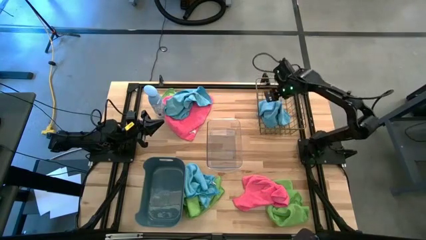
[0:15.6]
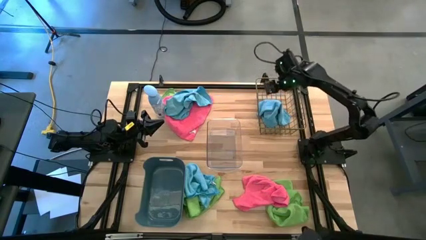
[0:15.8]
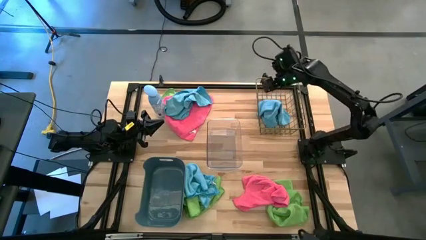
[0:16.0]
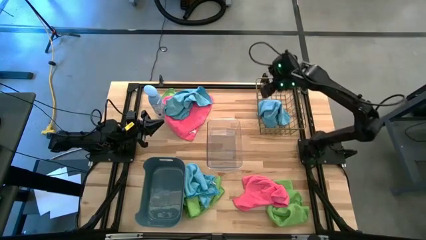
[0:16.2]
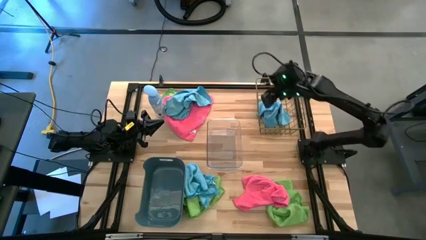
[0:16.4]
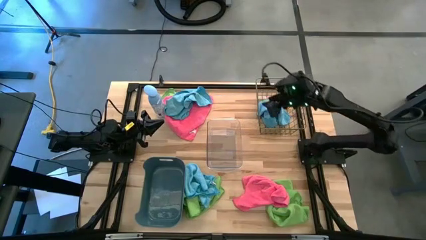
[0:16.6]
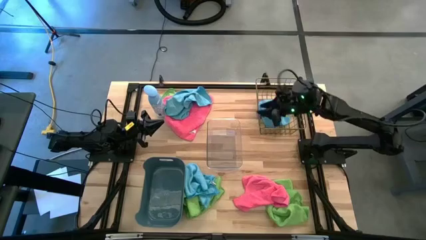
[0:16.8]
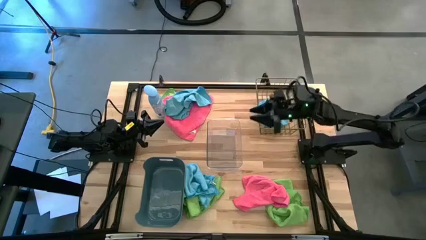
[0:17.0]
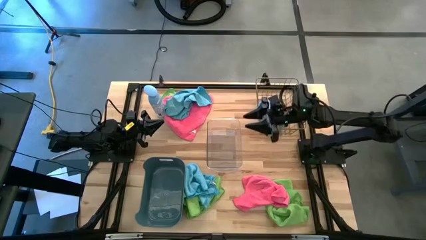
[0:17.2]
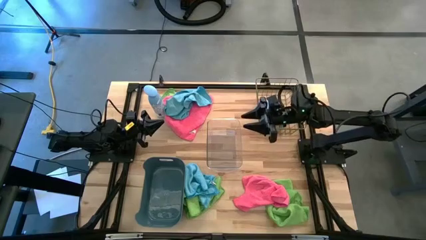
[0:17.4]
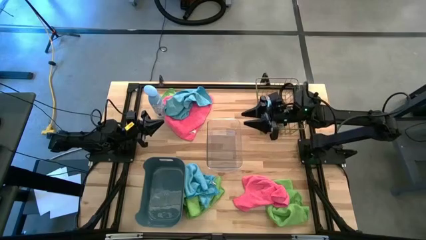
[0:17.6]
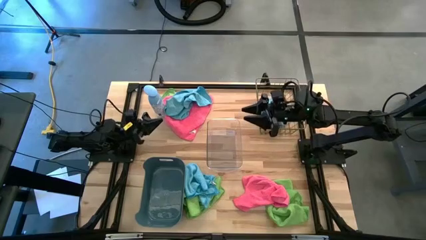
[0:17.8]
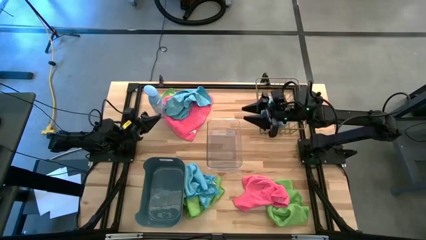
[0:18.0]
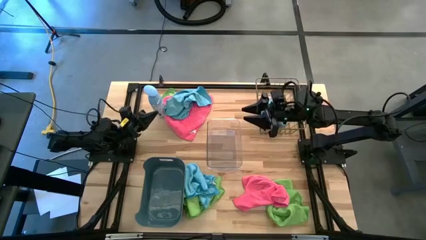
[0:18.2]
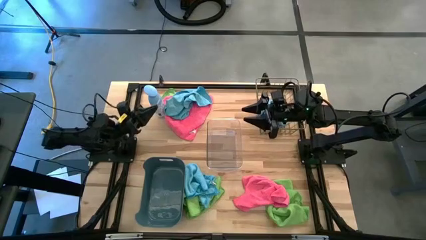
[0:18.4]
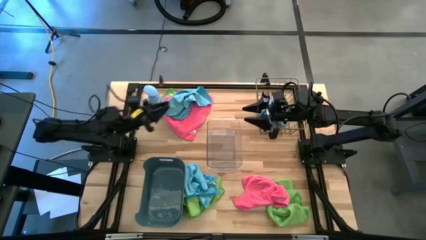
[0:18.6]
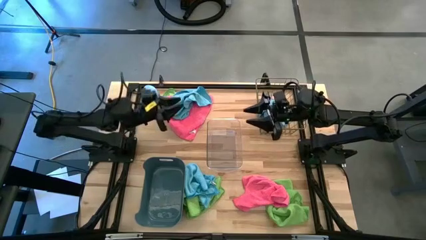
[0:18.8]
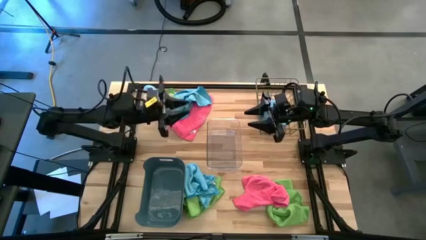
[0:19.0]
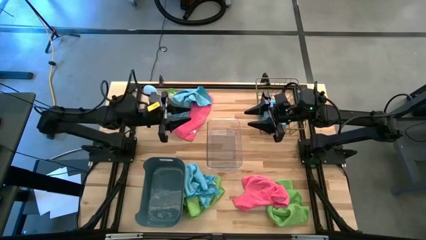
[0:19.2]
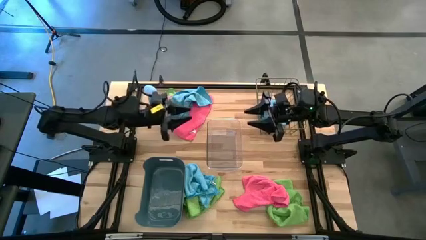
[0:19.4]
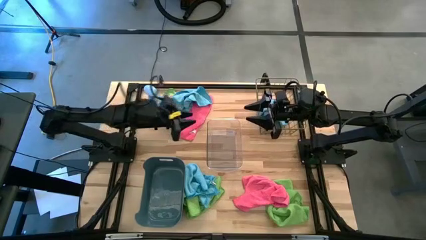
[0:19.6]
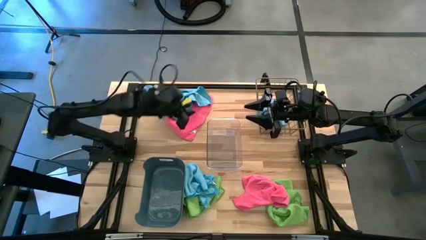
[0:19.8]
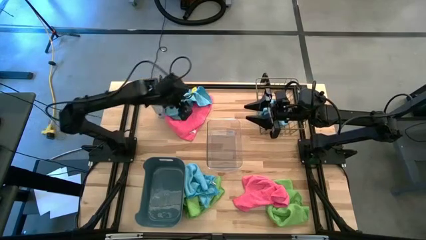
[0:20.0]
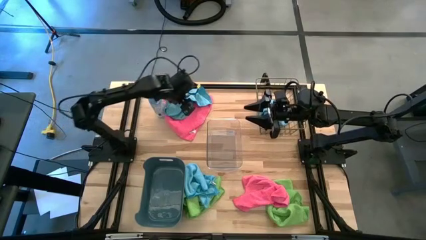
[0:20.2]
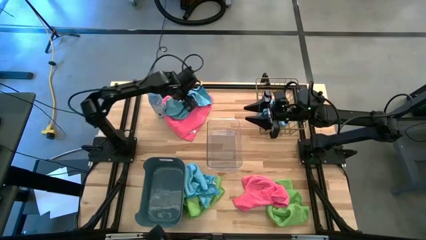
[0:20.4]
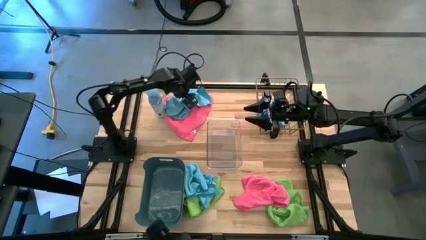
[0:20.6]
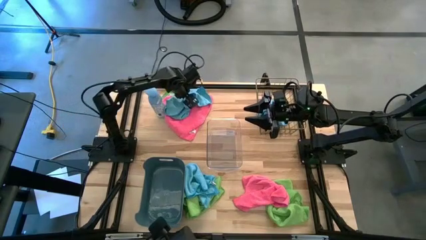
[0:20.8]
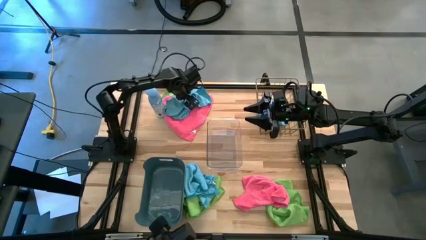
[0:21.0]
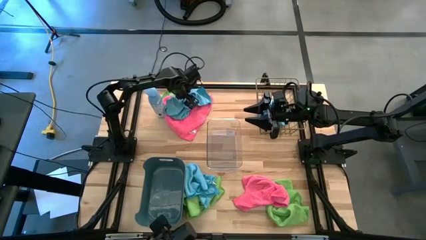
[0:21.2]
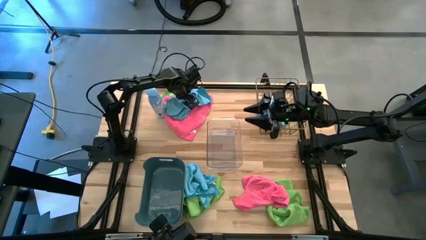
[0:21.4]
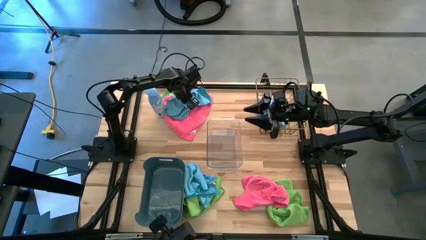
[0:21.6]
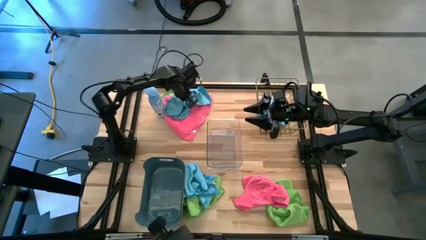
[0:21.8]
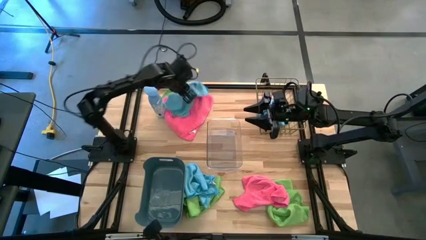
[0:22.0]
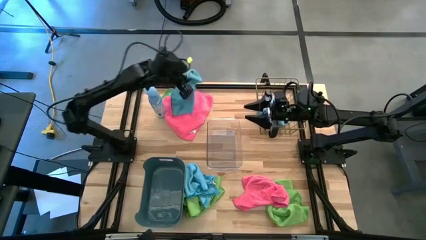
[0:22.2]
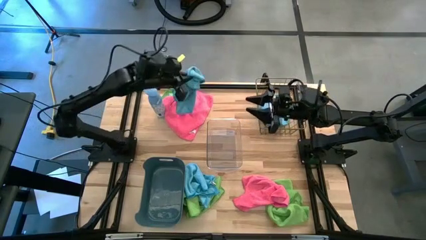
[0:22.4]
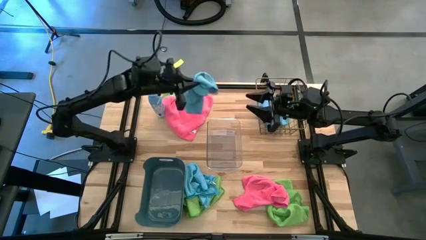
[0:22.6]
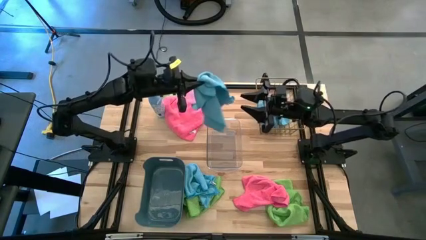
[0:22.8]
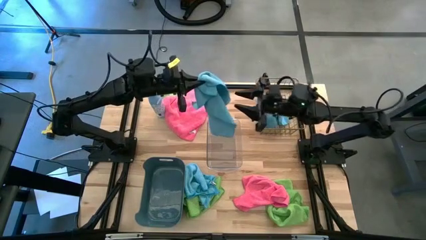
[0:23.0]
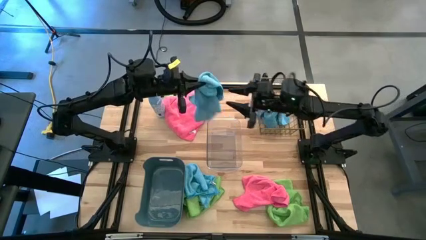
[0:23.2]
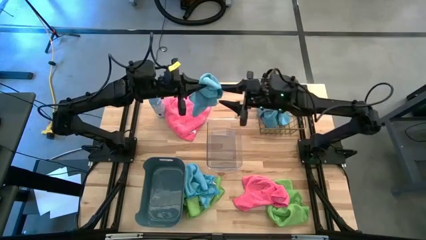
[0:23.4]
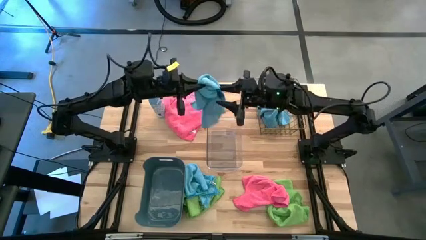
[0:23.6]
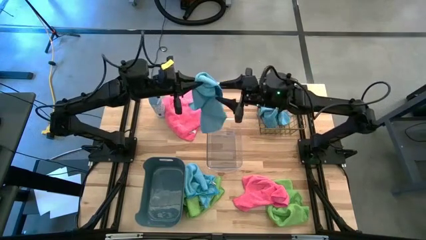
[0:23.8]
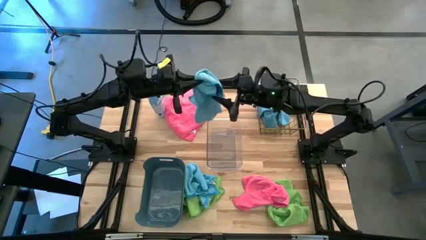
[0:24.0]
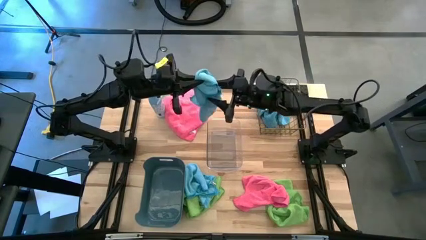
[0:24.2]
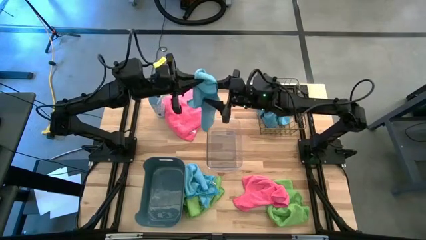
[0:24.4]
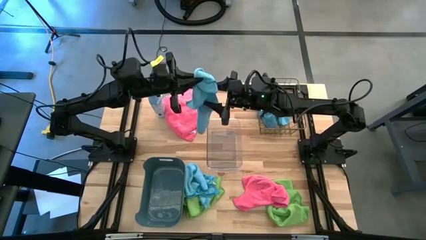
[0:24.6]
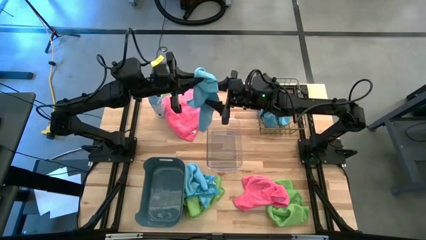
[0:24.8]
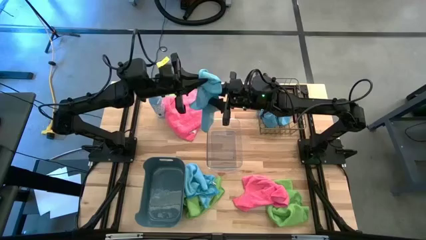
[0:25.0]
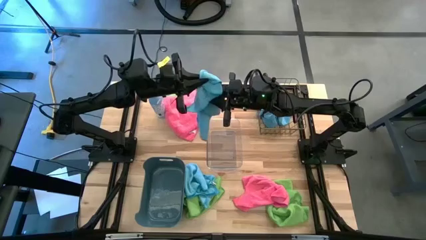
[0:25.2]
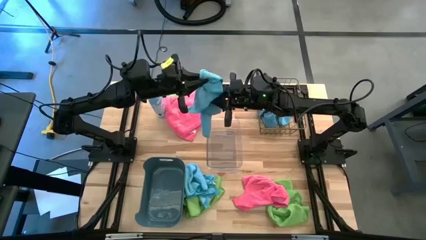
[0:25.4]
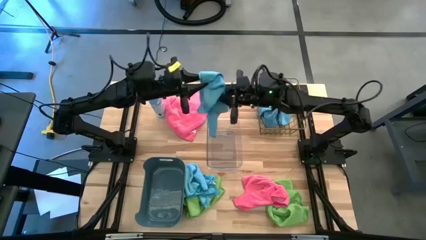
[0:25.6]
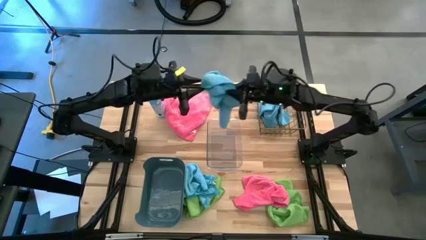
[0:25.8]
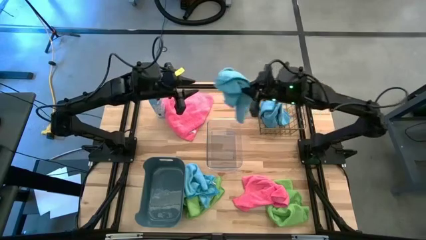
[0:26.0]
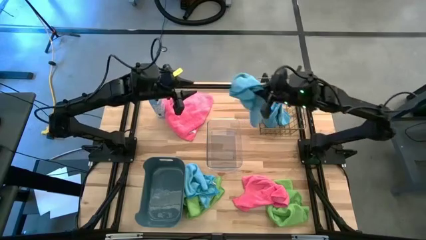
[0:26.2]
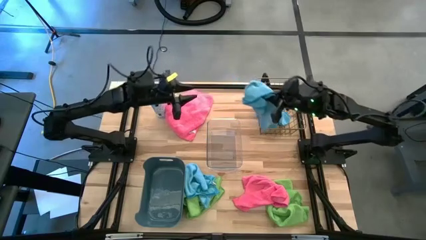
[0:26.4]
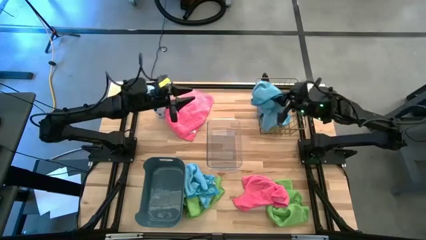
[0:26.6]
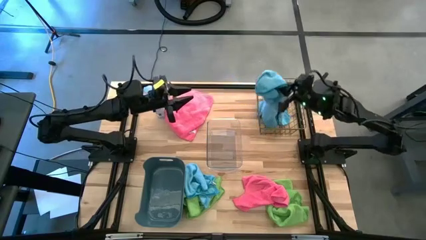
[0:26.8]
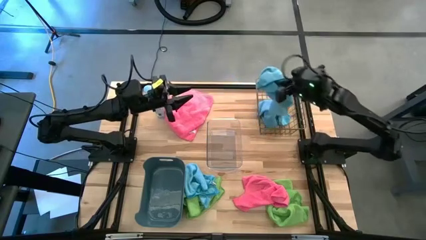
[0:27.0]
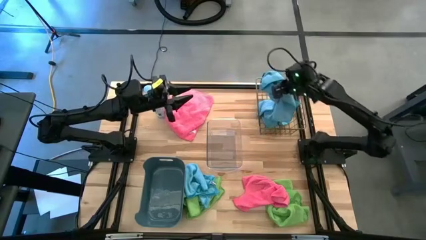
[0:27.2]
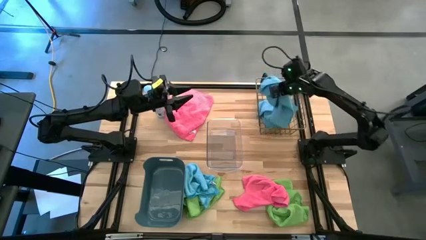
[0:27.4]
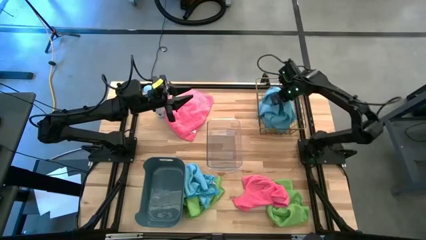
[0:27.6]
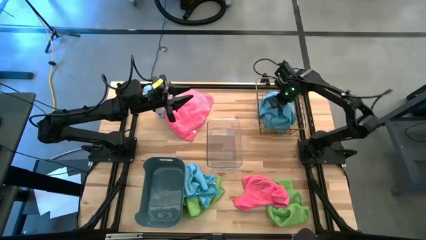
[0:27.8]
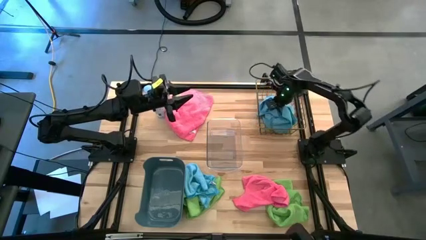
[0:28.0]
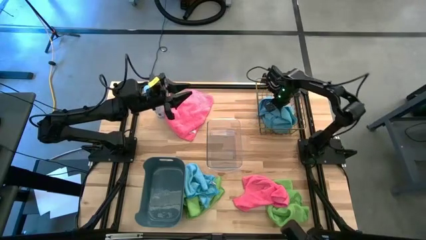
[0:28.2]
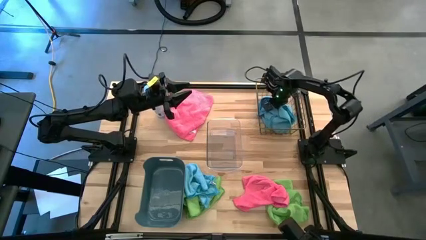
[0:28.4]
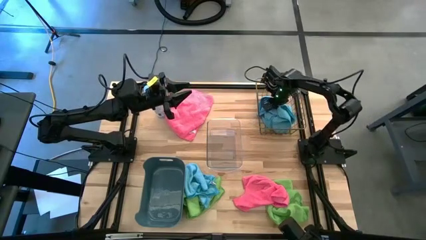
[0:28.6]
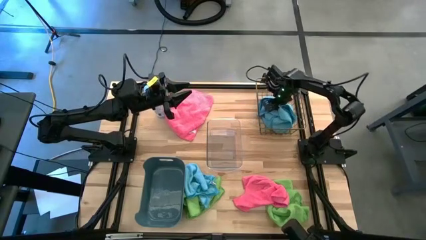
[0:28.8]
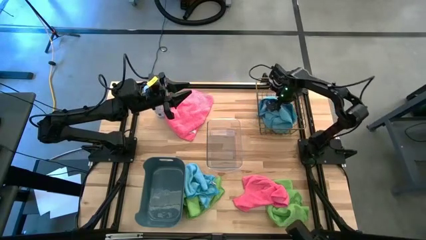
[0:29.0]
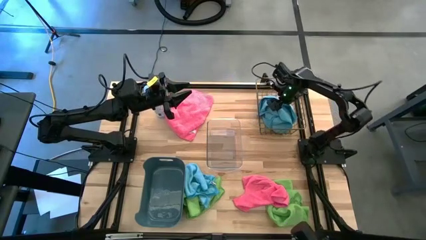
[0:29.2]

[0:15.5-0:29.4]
Task: Sort microfiber towel by color & place in baskets
Put the top blue microfiber cloth into the wire basket
